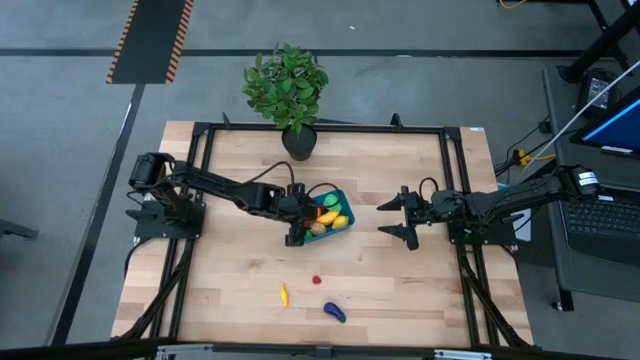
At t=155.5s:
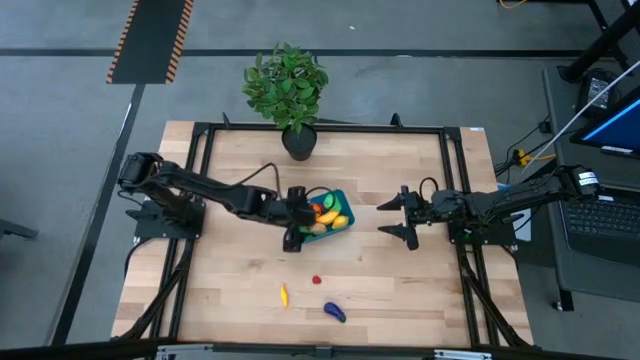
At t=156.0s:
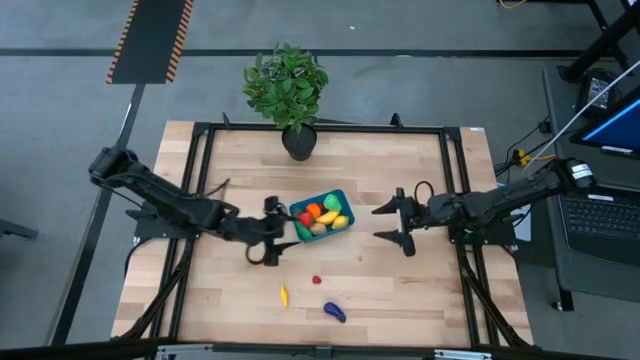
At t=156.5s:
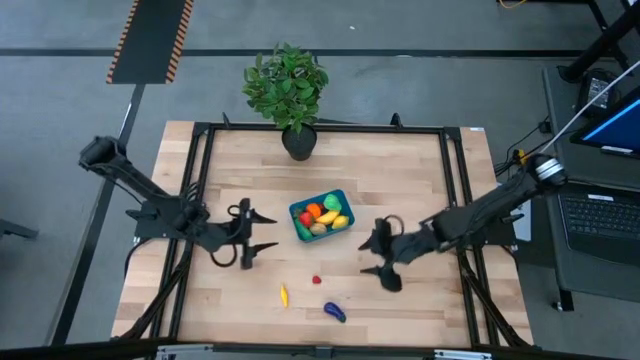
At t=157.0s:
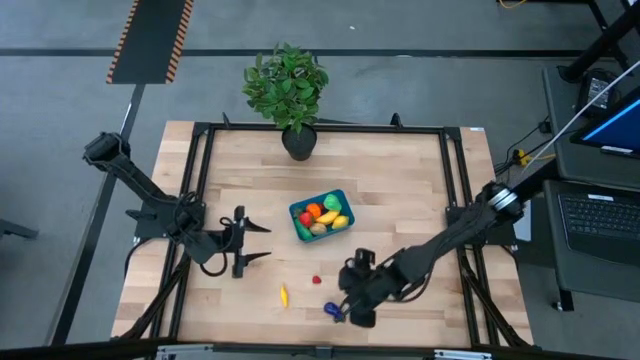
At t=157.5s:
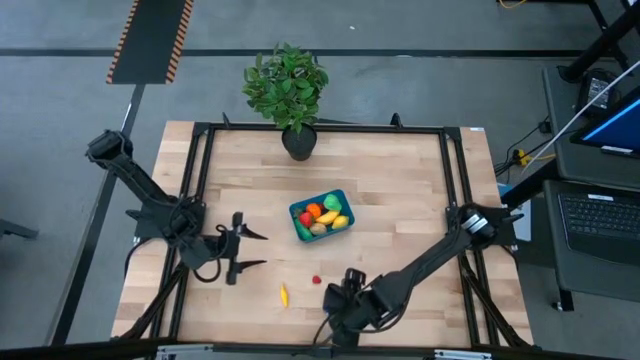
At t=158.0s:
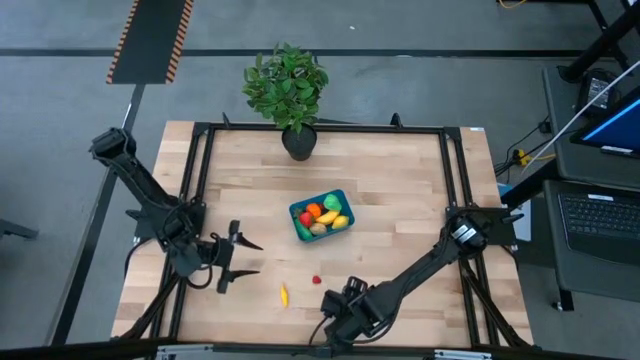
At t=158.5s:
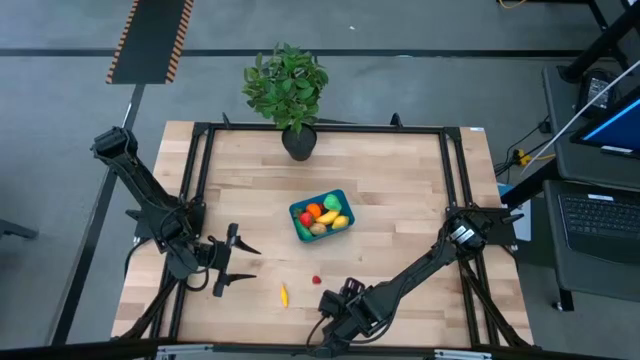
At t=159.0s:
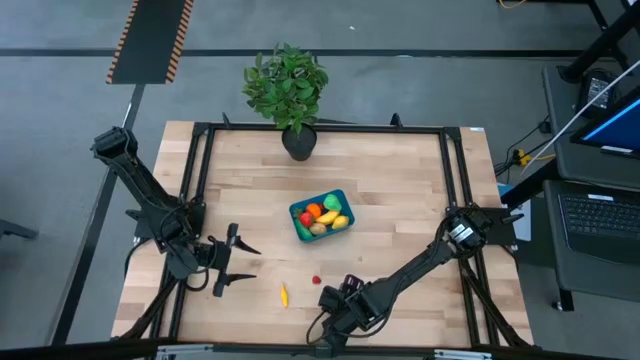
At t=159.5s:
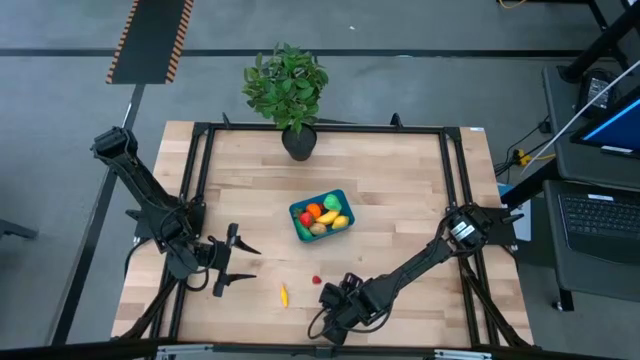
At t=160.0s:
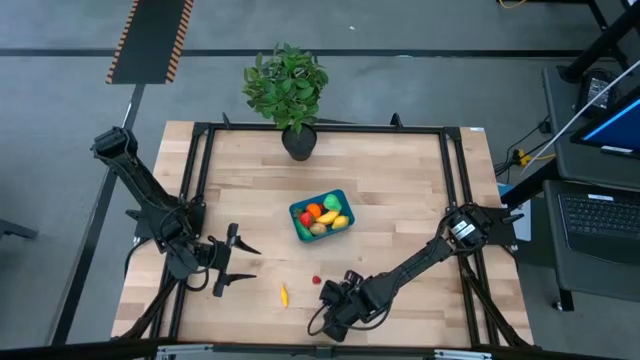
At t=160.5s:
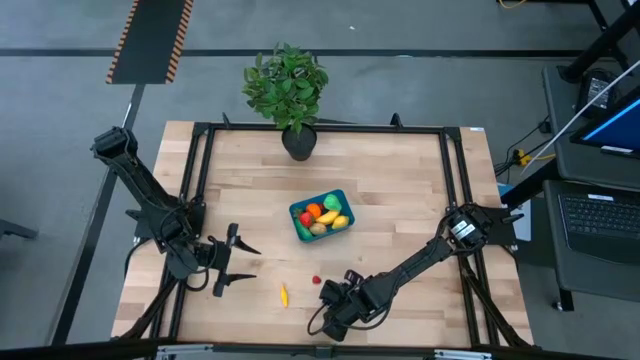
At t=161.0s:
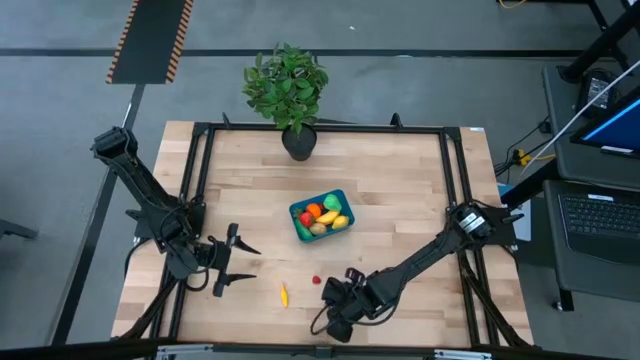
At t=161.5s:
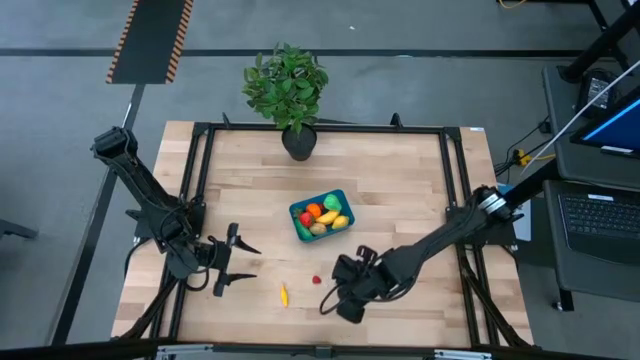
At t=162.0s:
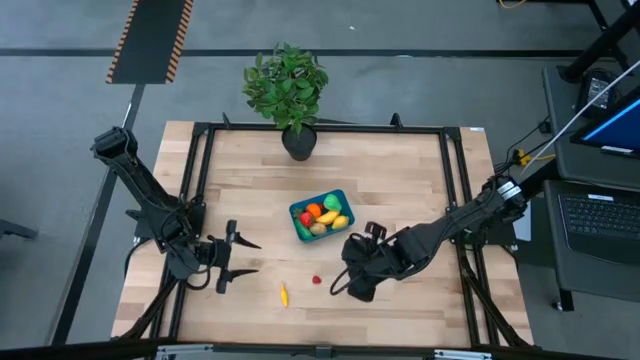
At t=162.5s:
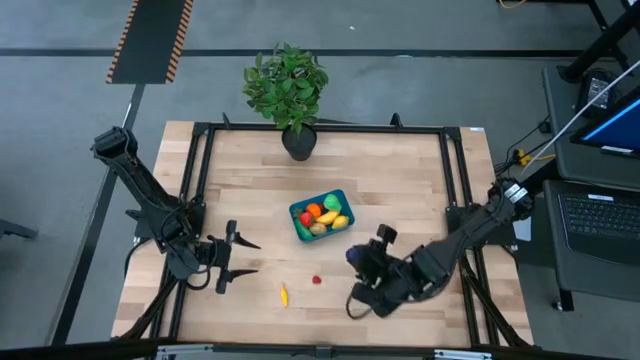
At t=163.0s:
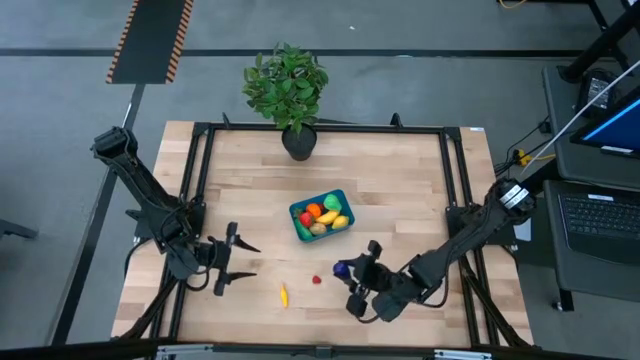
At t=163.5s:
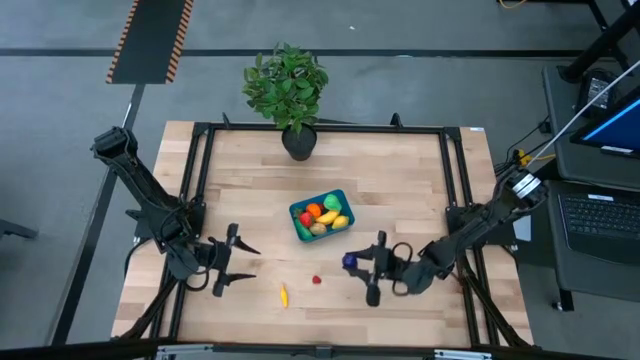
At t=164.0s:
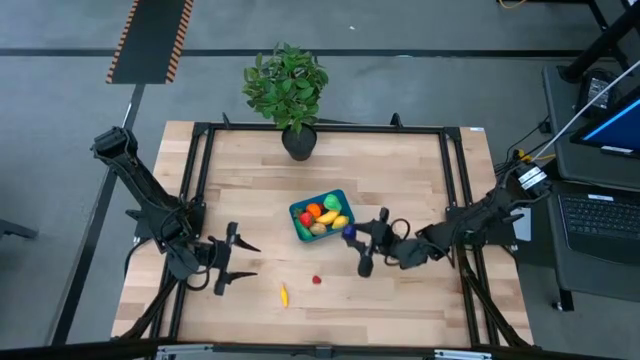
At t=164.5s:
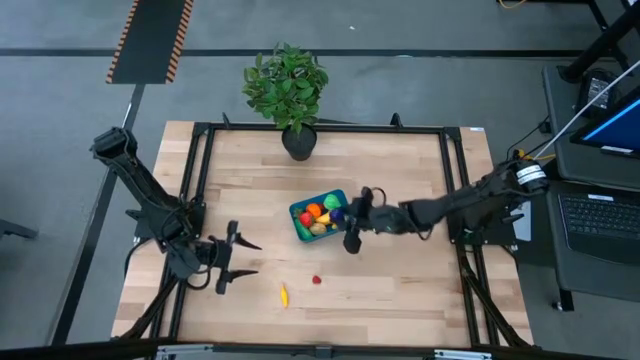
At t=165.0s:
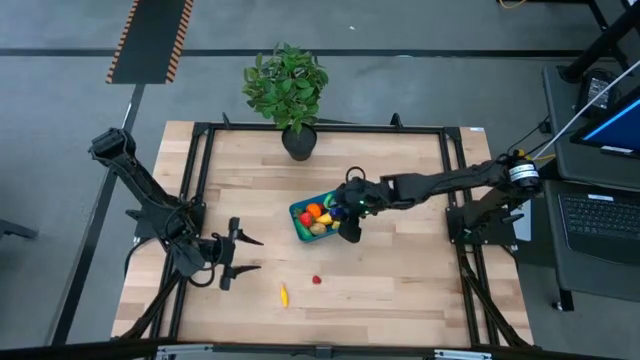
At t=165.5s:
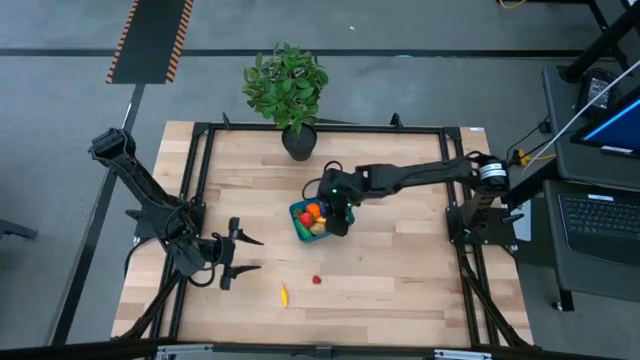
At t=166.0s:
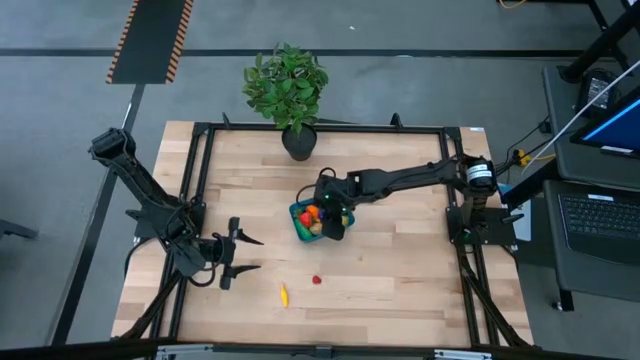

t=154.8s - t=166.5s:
Task: Pick and placing Produce into tupperware
Put the violet eggplant into the blue bin

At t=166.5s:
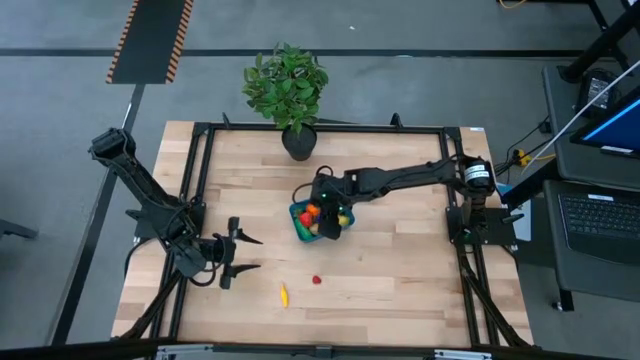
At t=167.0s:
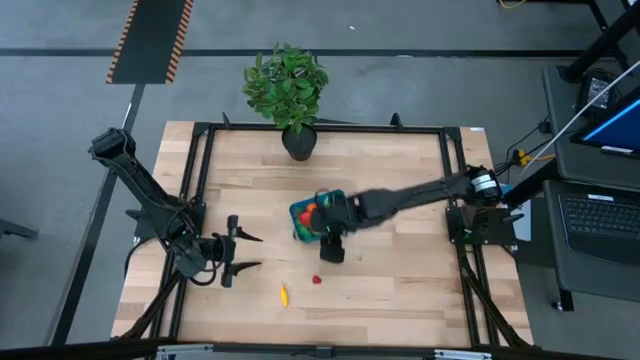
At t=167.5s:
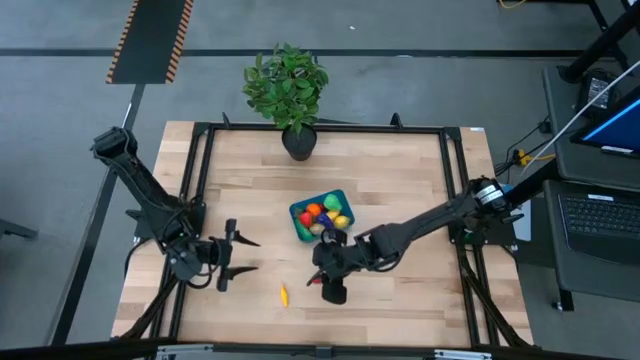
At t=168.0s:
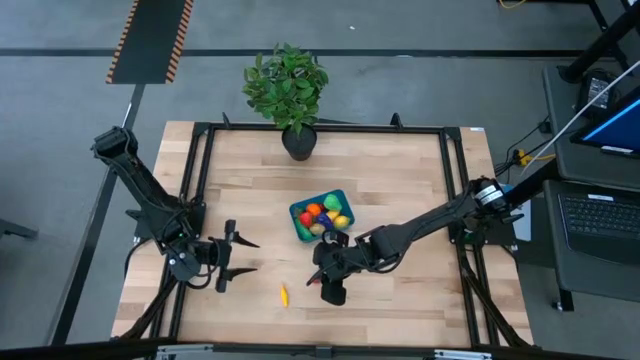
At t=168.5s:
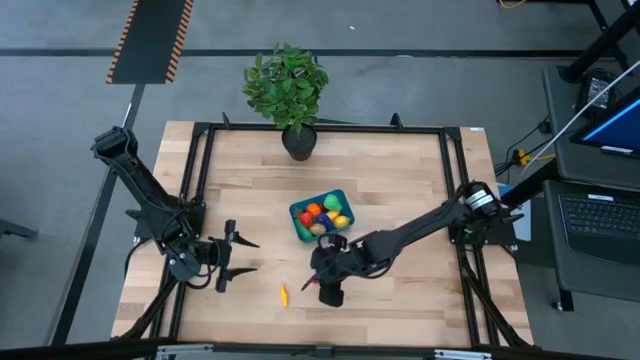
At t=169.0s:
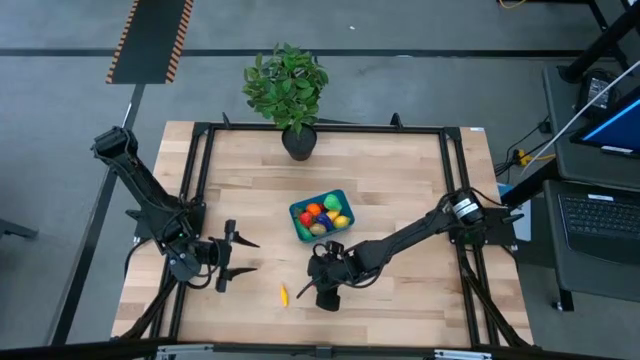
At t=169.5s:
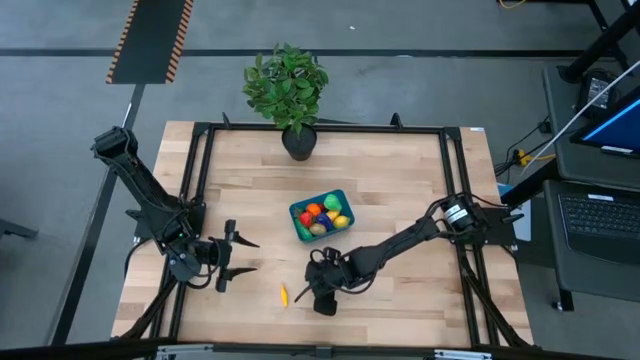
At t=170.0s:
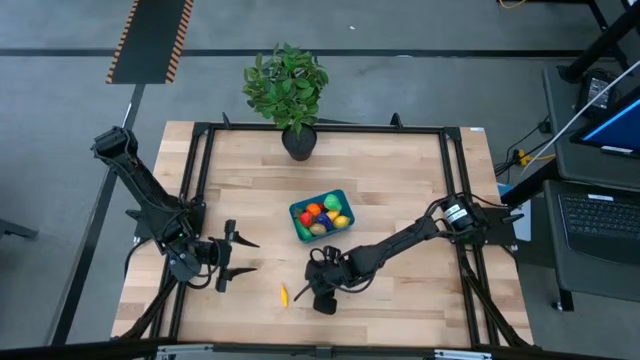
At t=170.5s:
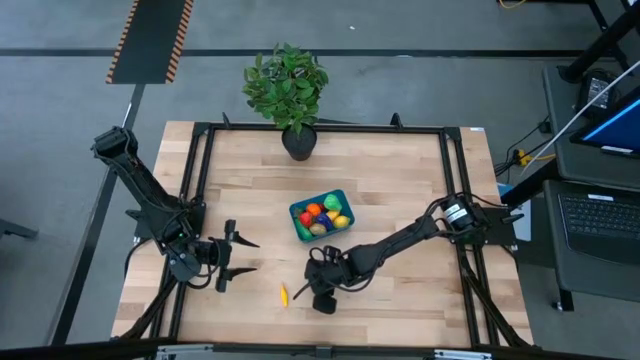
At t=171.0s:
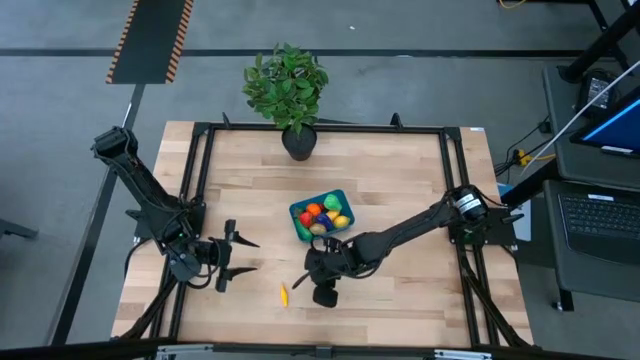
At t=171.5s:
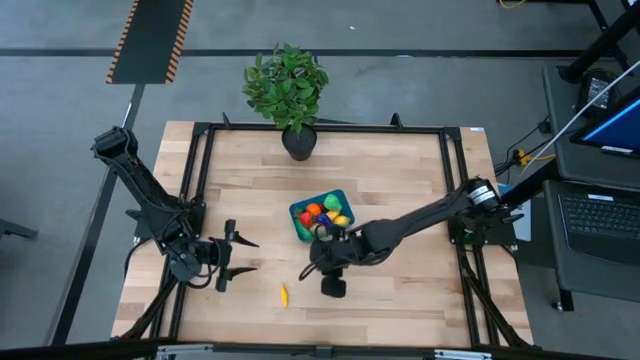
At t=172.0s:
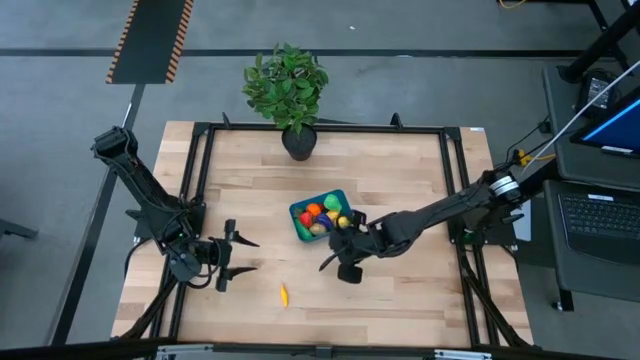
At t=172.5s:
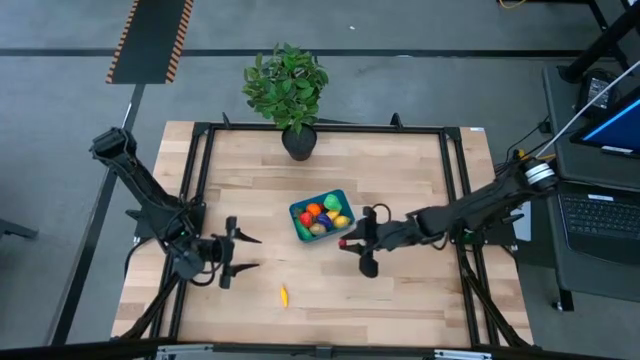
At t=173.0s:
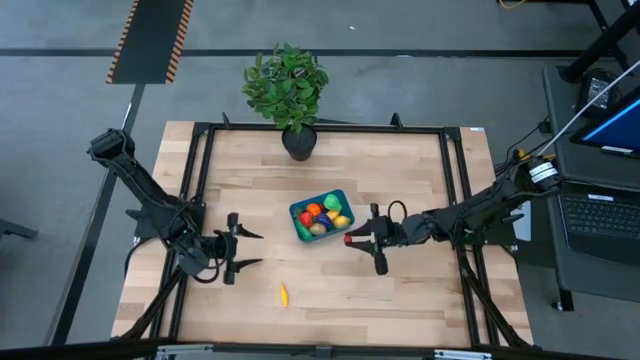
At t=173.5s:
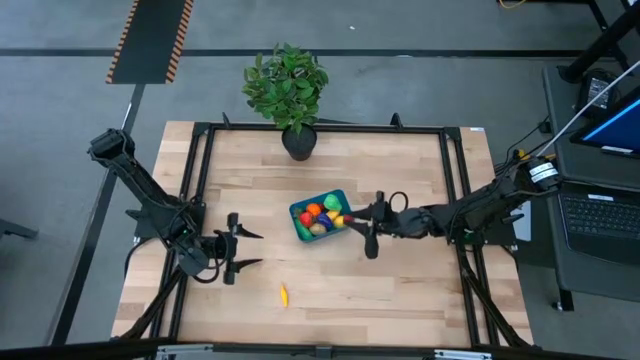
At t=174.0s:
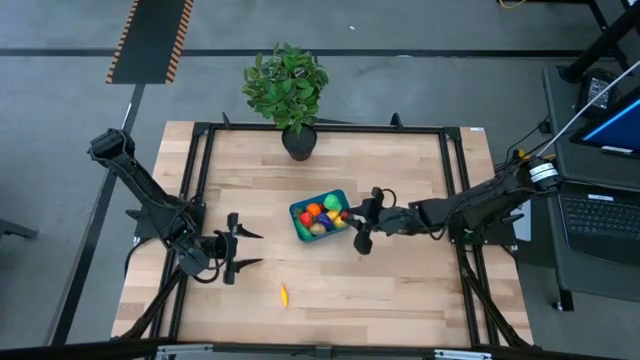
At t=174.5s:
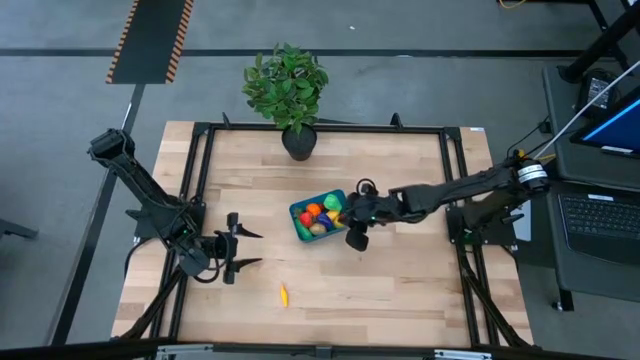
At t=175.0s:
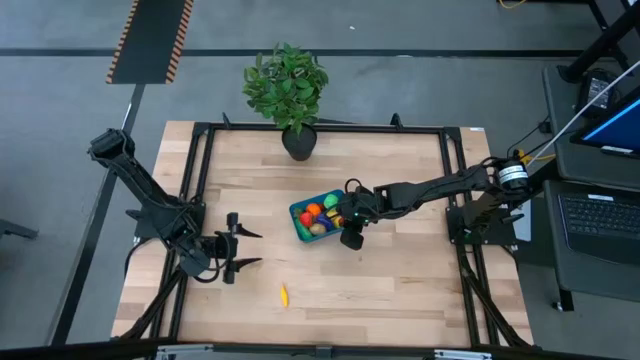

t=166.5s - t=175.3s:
Put the red raspberry into the blue bin

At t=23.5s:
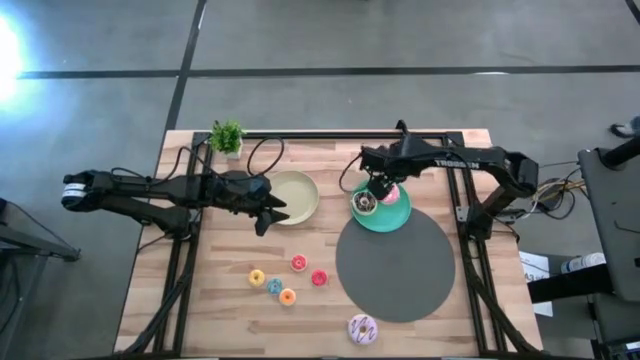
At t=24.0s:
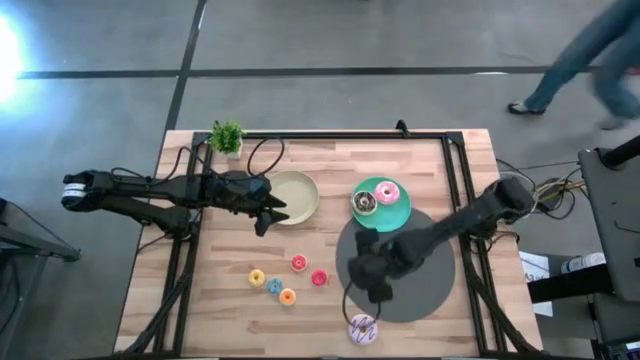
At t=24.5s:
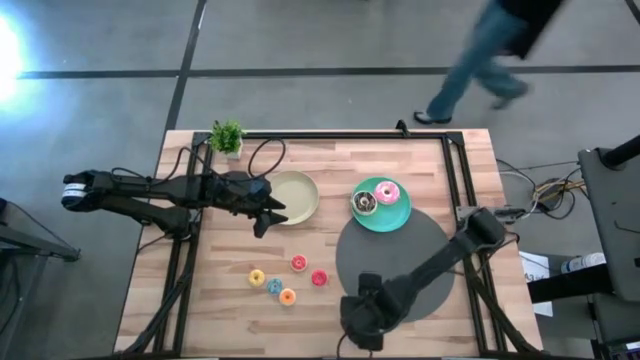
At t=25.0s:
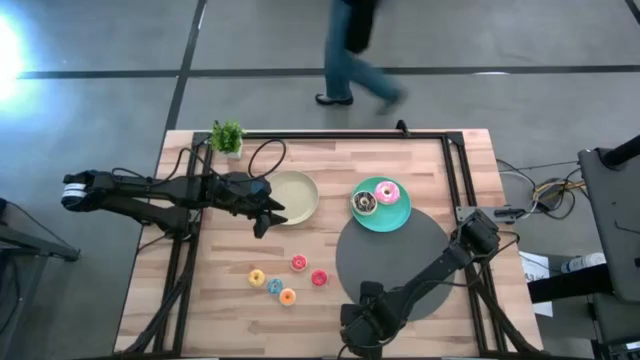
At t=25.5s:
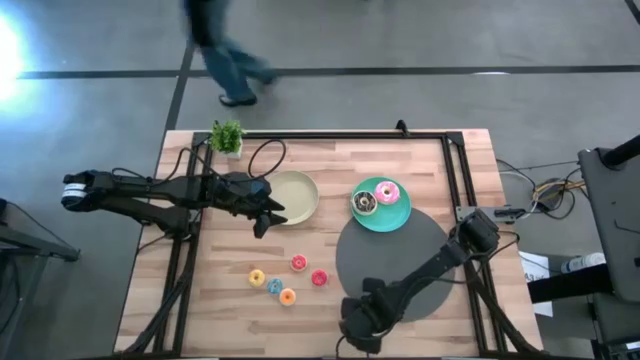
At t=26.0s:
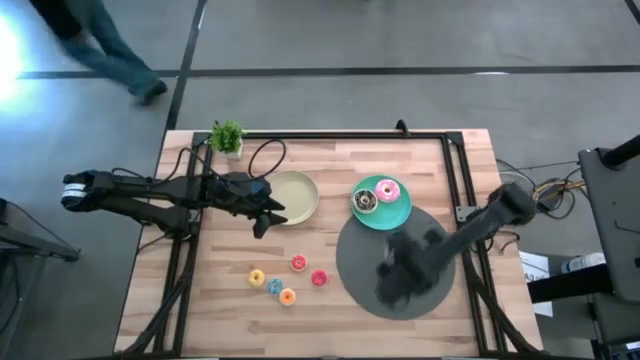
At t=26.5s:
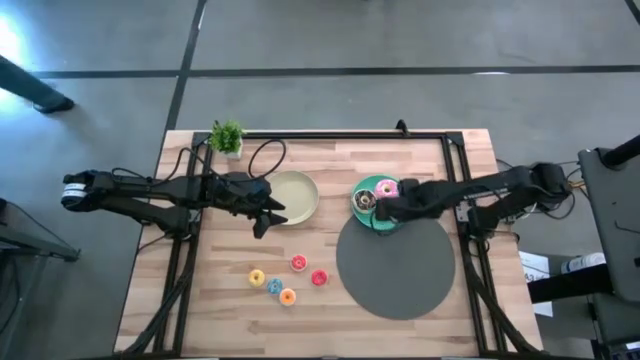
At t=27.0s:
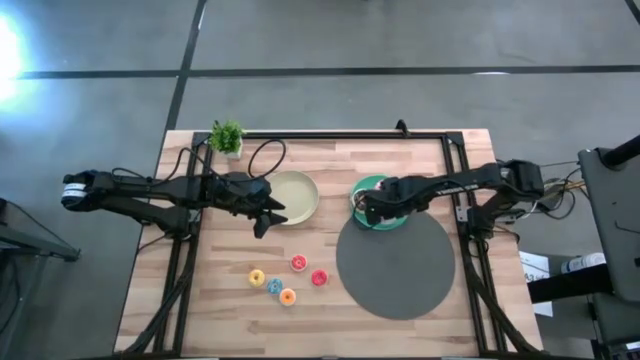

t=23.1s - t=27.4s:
Task: Pick & Place donuts
Put the large purple donut on the blue plate
